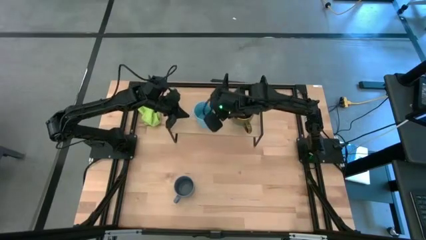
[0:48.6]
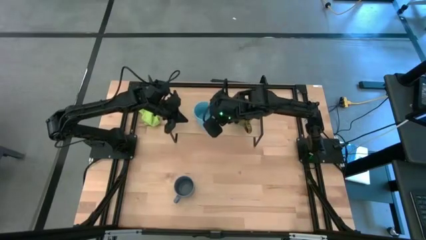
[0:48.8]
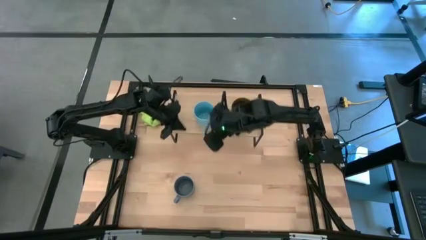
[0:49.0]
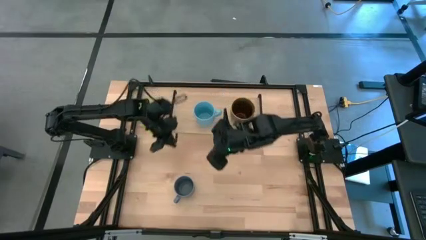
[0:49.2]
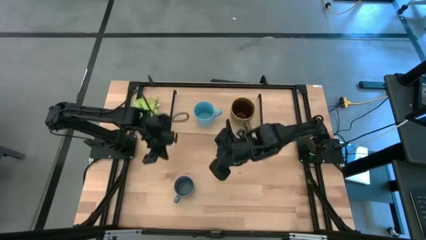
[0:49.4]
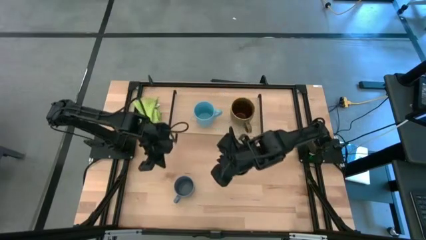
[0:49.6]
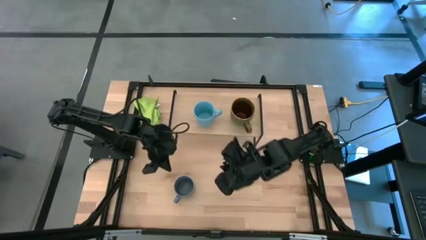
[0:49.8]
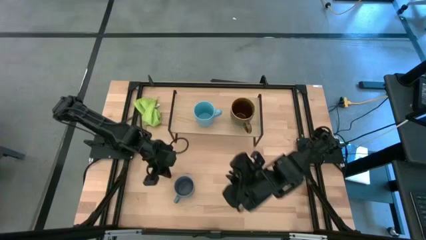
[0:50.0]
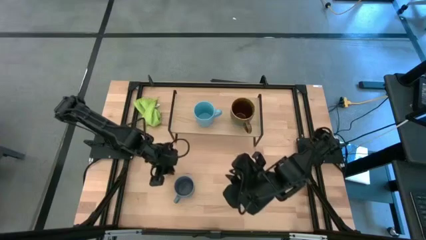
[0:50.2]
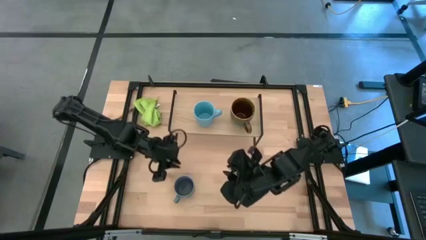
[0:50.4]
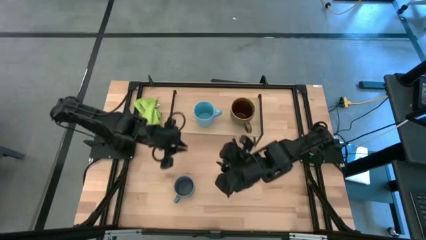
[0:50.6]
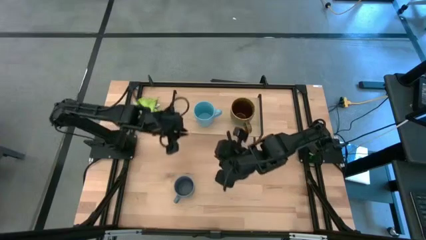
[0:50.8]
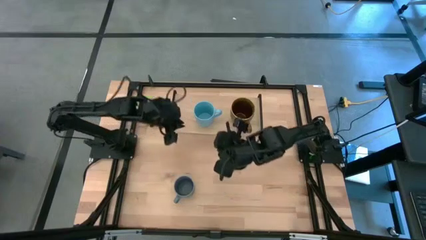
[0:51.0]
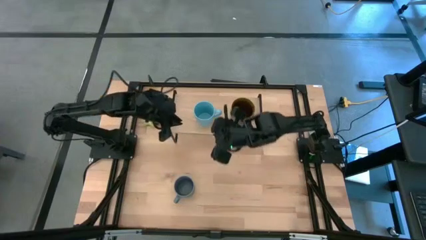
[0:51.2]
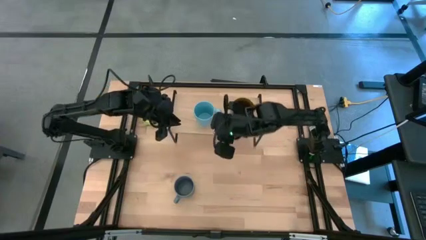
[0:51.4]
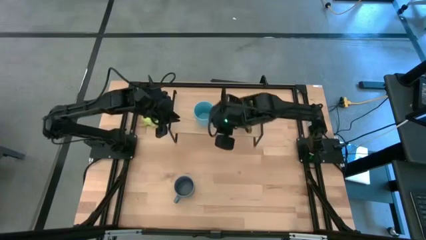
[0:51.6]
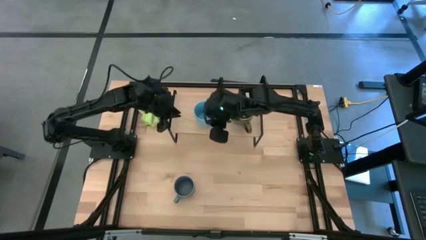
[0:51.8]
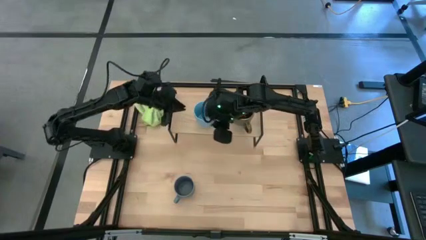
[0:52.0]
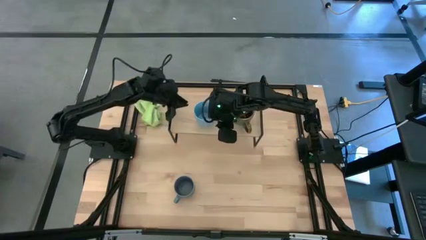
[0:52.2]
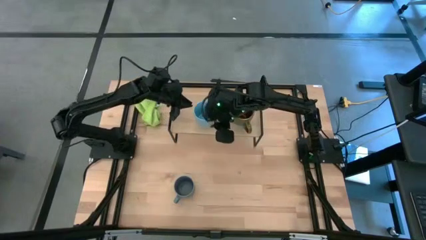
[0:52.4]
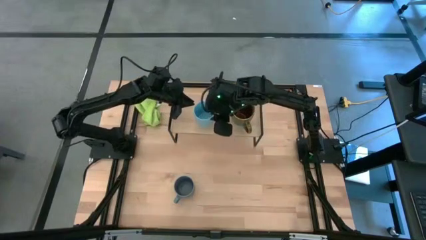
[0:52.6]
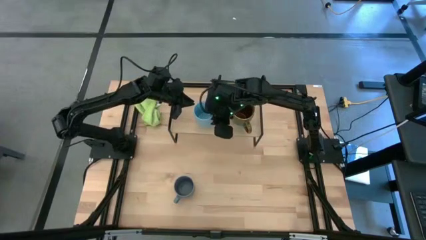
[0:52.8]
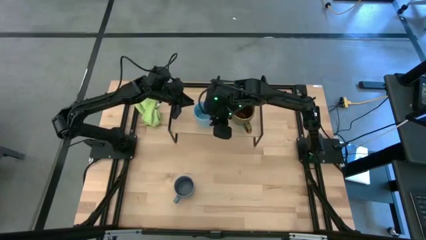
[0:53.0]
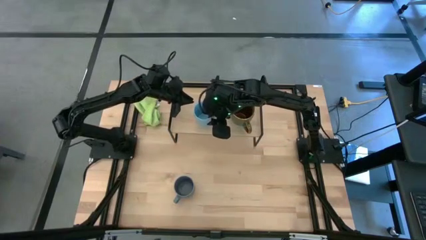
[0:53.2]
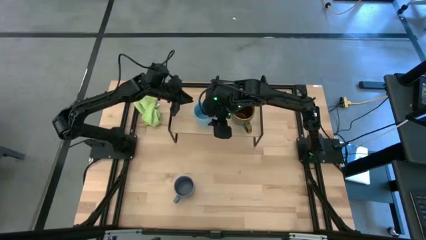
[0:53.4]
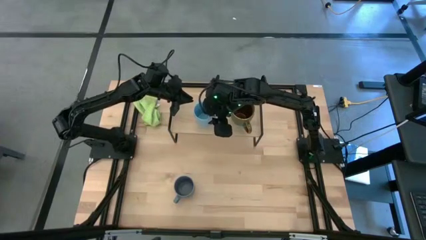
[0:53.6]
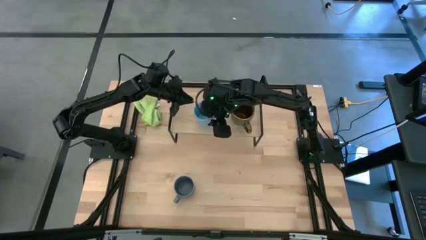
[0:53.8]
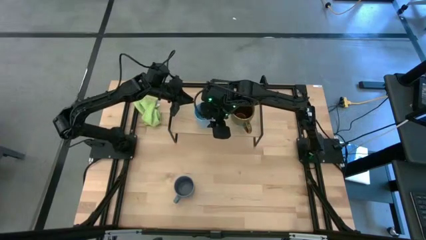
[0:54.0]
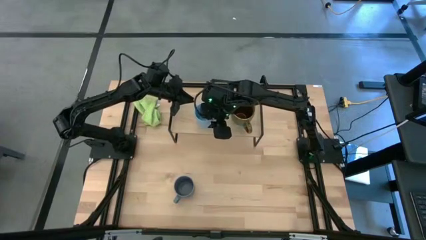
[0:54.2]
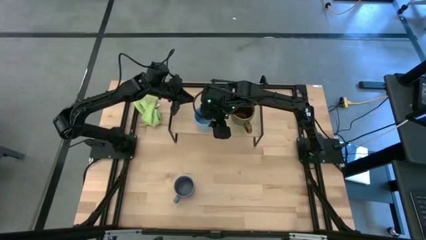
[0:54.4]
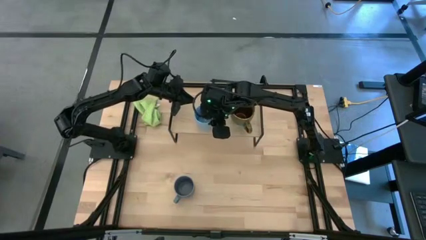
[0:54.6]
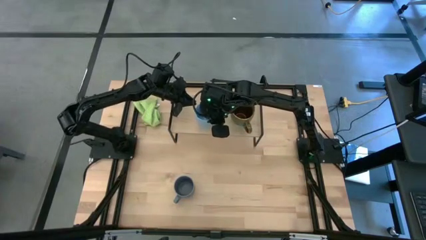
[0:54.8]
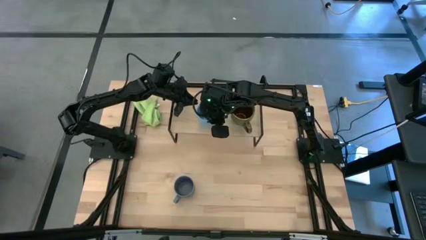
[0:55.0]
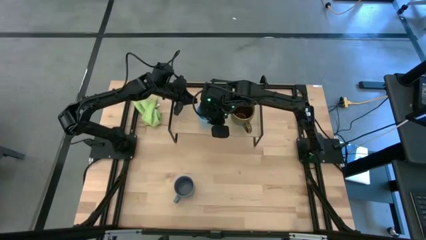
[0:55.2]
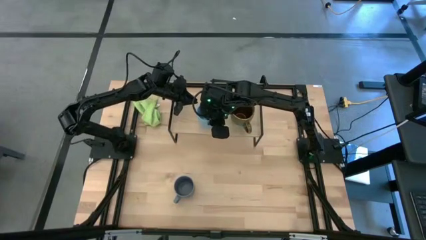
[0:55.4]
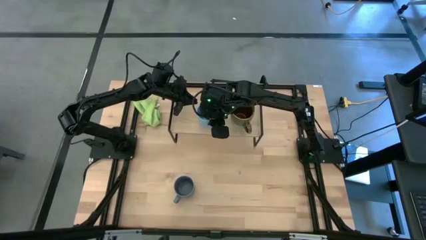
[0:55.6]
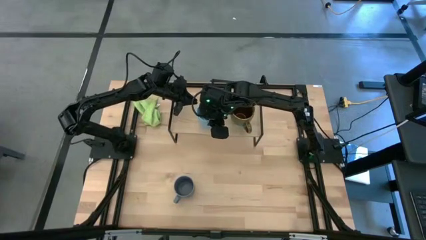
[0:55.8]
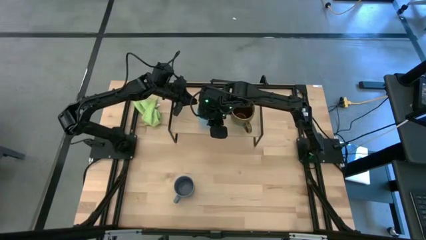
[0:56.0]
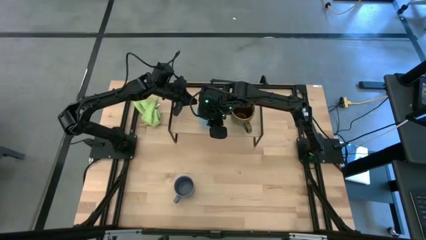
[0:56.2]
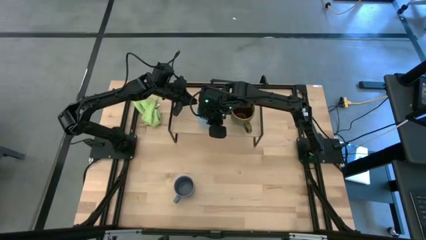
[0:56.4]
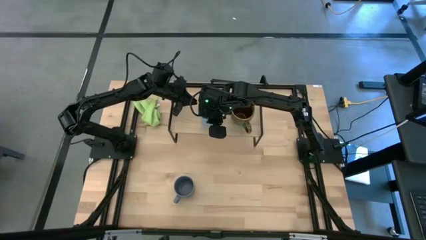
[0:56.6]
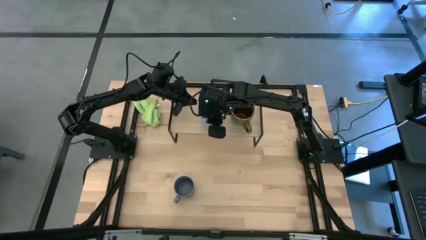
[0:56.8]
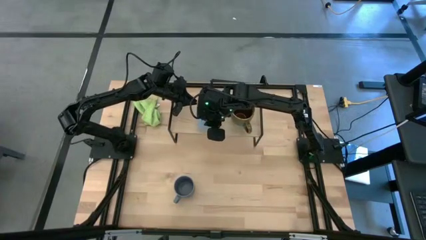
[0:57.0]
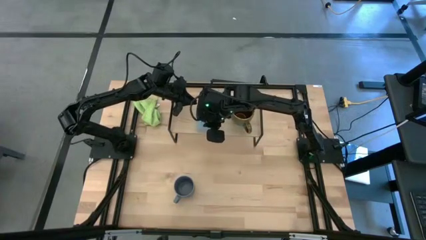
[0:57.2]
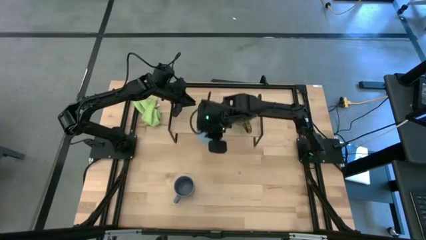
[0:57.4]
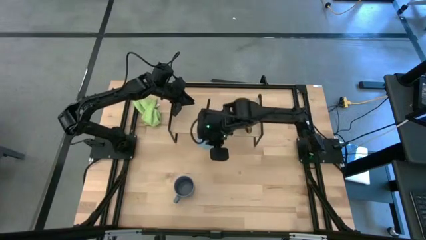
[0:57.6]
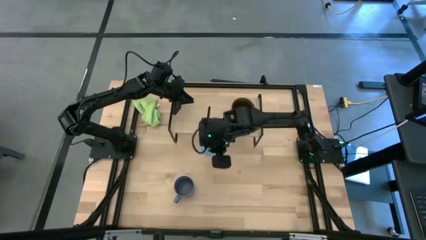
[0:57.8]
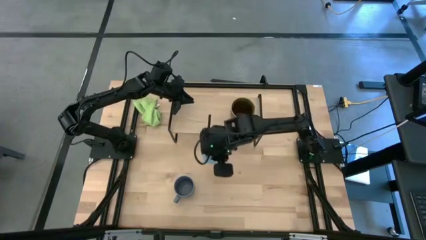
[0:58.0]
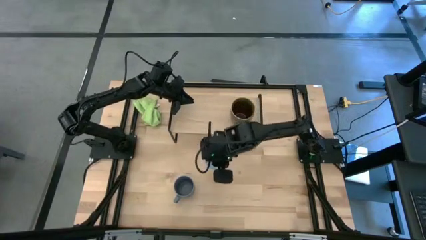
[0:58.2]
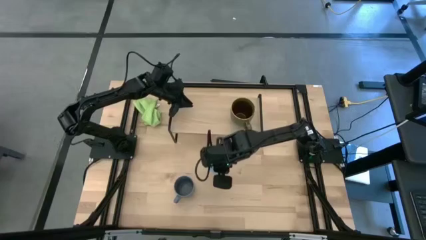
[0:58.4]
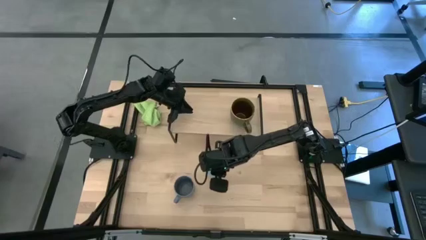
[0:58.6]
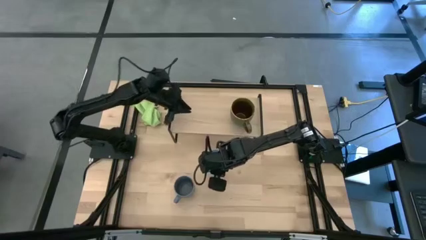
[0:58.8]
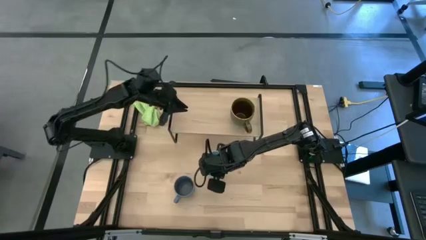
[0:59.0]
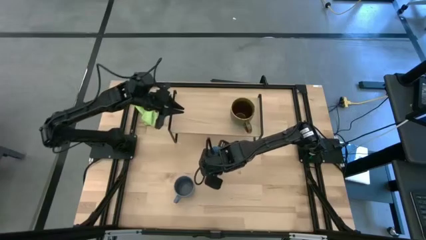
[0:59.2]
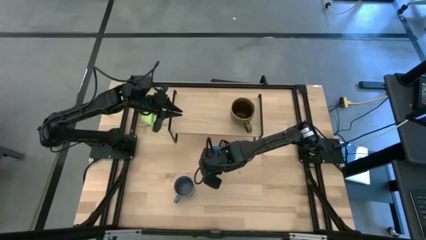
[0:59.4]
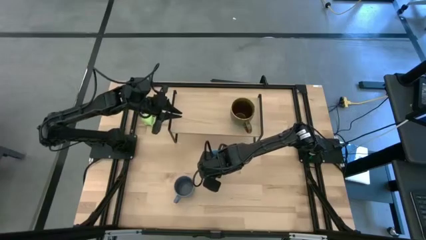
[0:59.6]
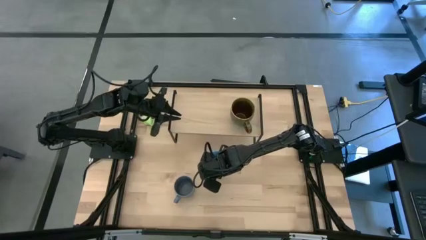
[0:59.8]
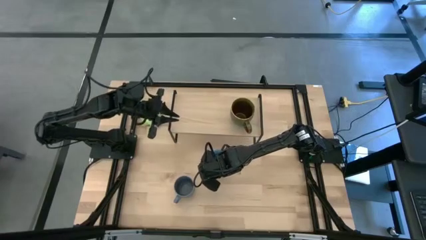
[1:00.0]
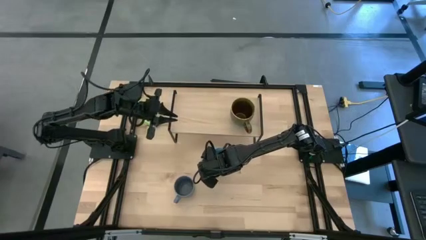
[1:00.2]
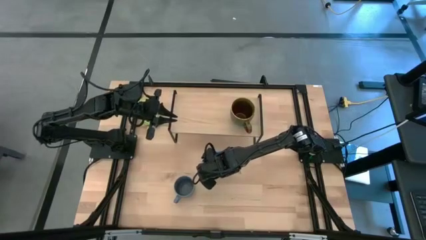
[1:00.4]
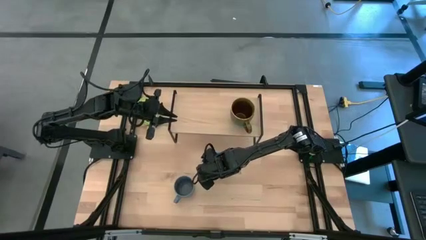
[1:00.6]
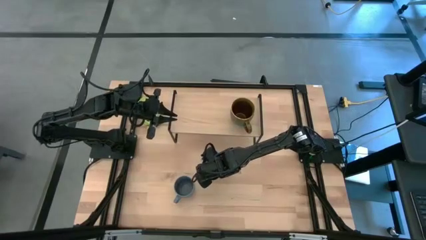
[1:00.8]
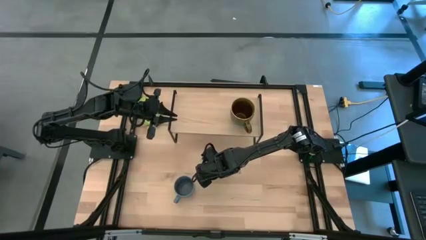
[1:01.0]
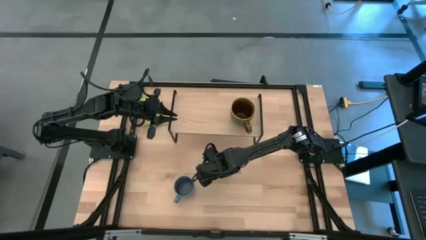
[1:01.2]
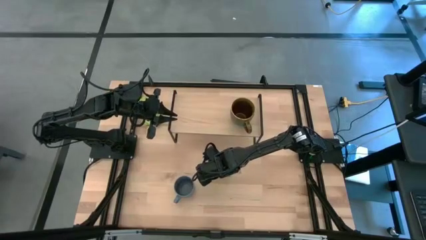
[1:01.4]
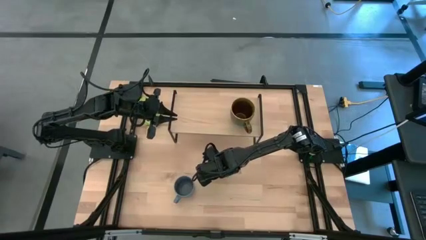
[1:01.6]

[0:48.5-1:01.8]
Task: Stack small to large cups/mugs on shelf
Remove the blue mug from the shelf
